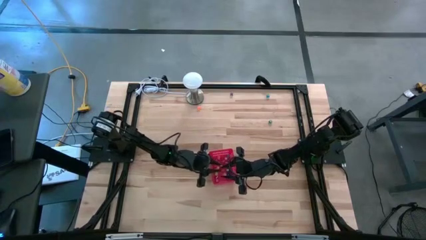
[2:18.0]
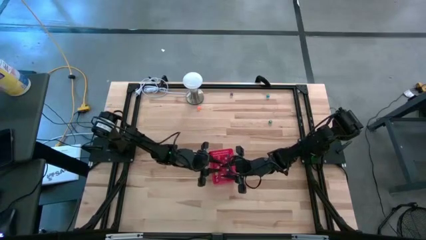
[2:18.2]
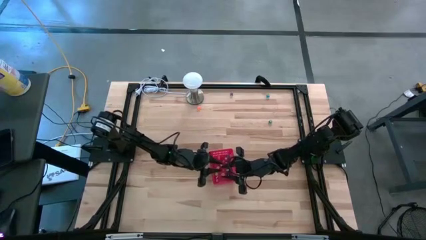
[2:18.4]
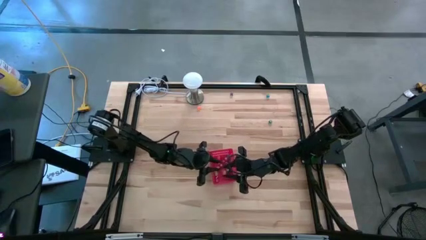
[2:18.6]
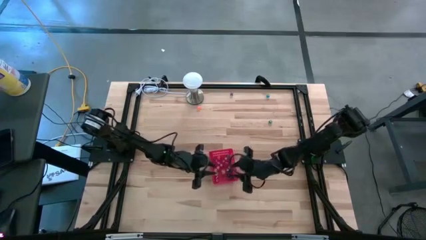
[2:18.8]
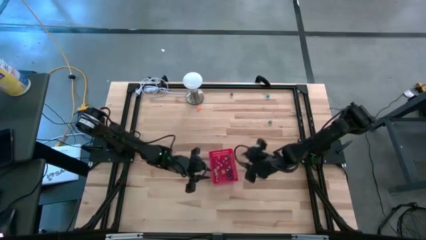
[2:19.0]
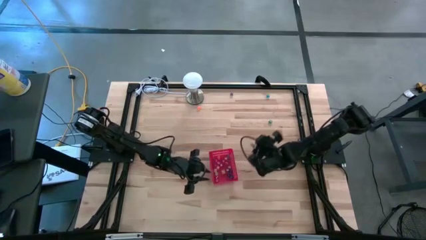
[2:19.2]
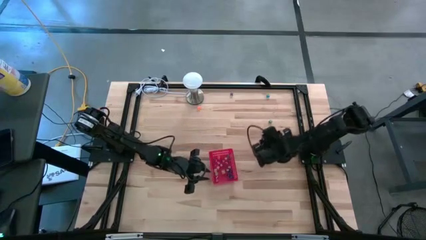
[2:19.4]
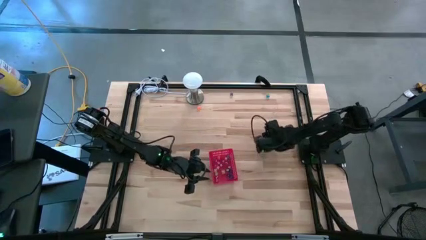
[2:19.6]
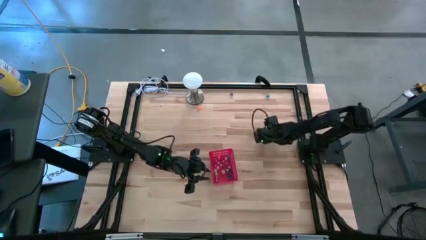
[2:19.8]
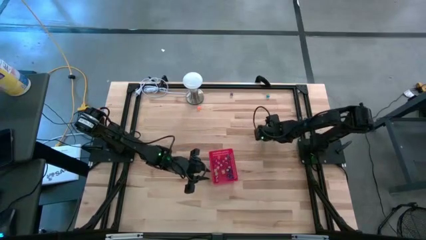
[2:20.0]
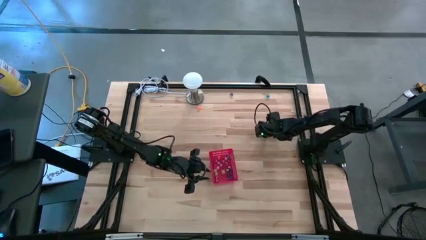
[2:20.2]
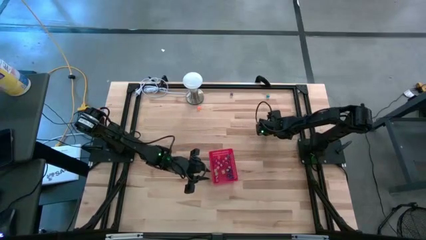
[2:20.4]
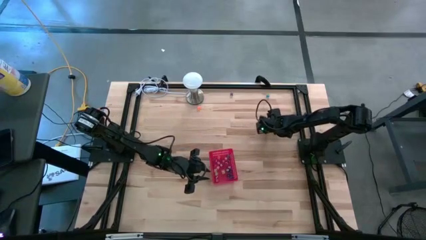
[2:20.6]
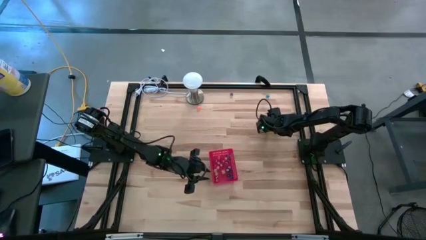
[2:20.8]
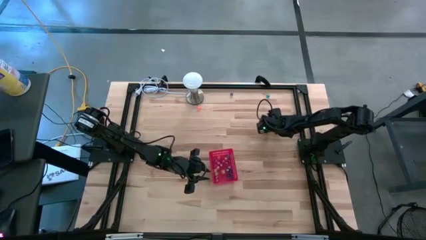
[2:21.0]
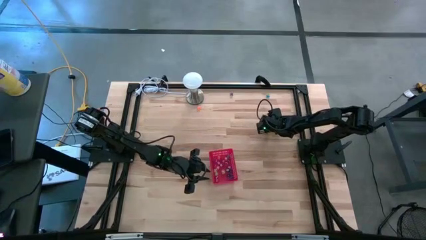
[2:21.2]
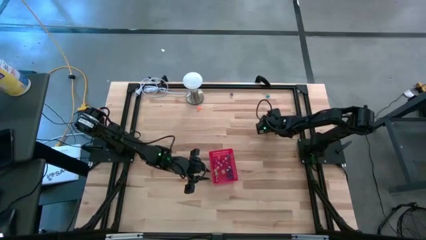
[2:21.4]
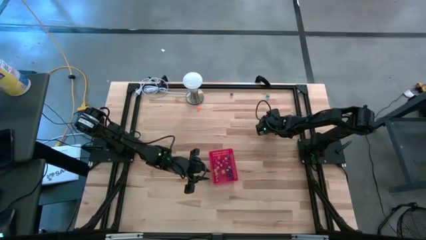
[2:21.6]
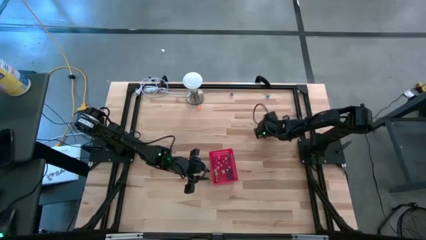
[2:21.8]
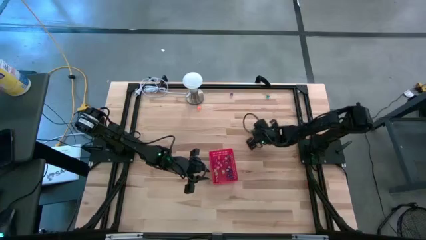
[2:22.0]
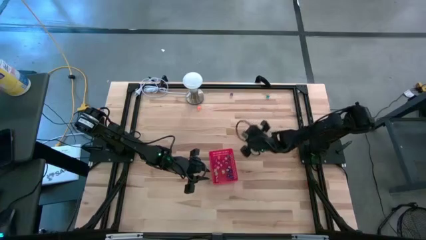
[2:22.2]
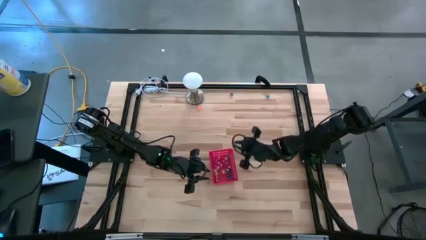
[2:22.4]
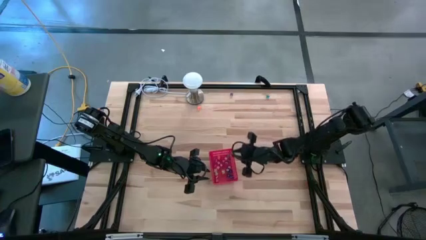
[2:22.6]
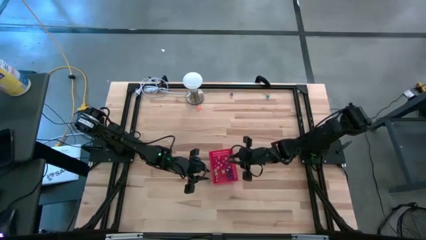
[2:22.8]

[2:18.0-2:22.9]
Task: Pick & Place Dice
Put the green die into the red basket

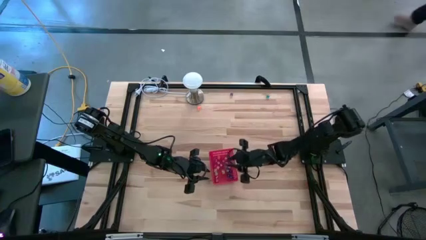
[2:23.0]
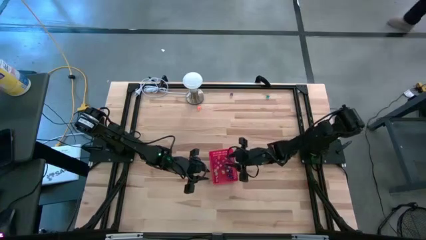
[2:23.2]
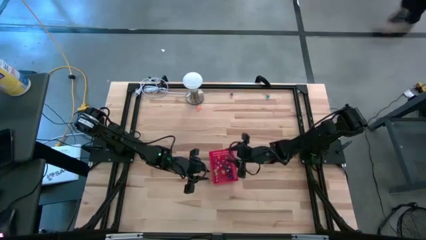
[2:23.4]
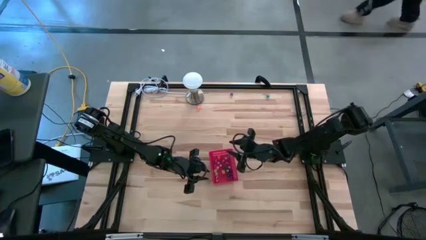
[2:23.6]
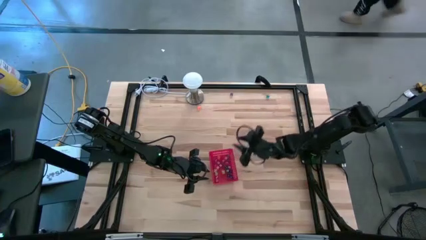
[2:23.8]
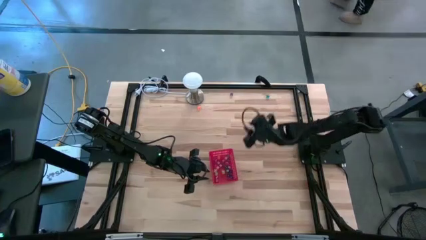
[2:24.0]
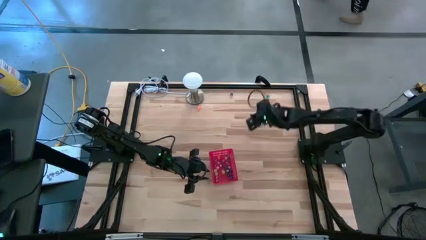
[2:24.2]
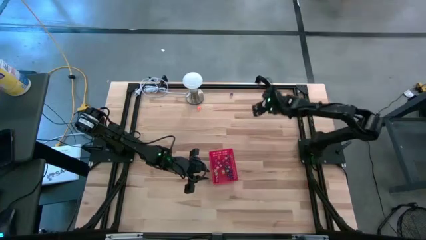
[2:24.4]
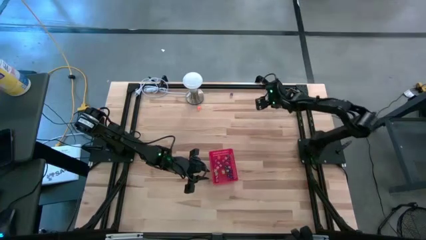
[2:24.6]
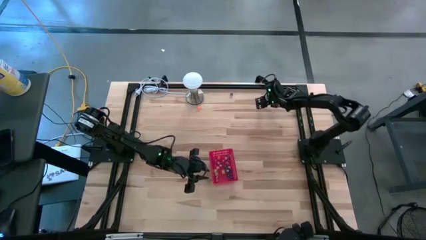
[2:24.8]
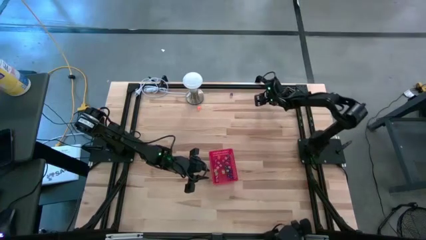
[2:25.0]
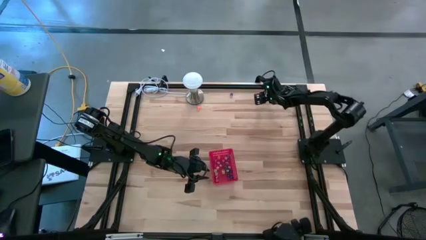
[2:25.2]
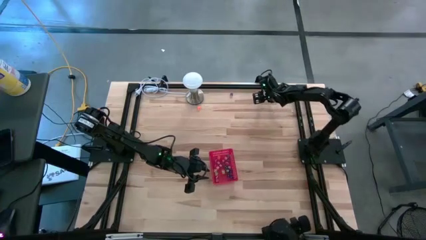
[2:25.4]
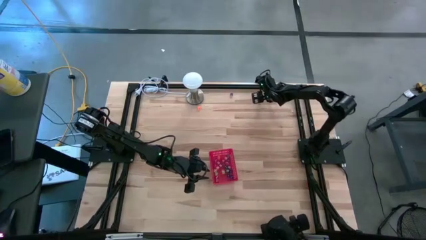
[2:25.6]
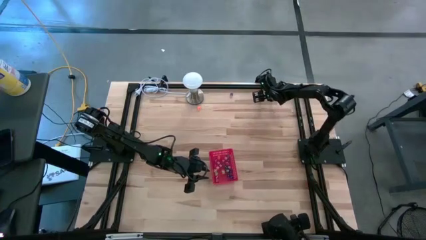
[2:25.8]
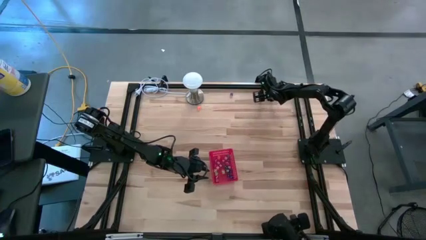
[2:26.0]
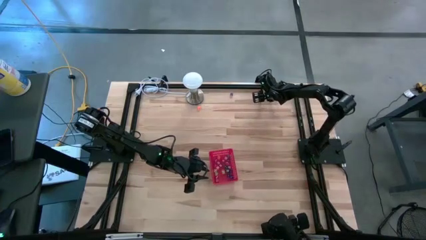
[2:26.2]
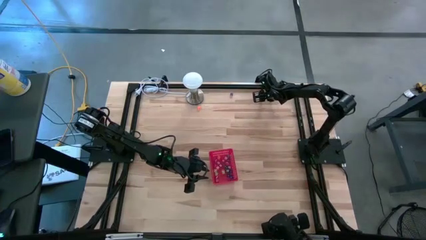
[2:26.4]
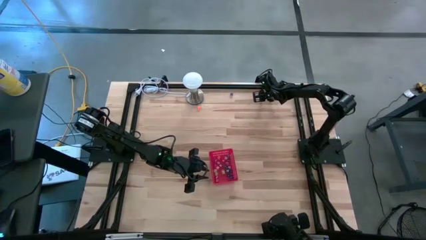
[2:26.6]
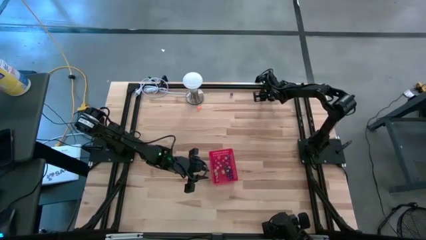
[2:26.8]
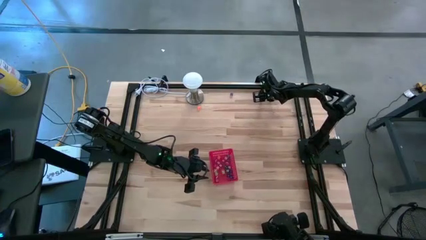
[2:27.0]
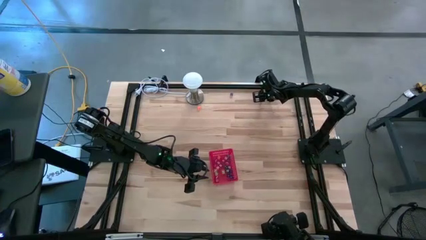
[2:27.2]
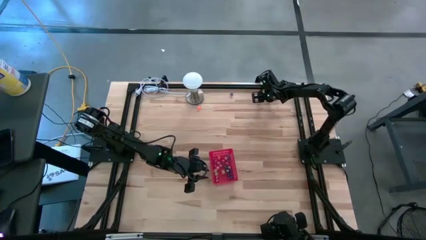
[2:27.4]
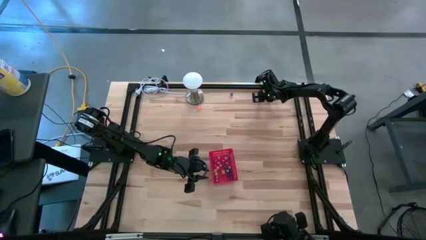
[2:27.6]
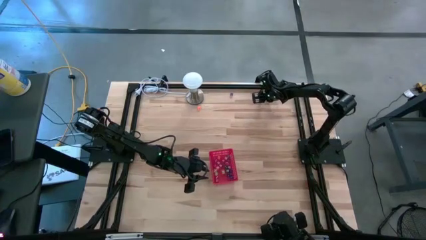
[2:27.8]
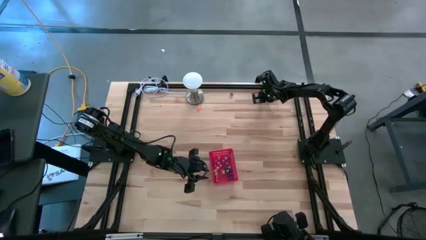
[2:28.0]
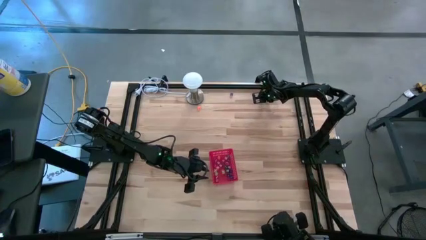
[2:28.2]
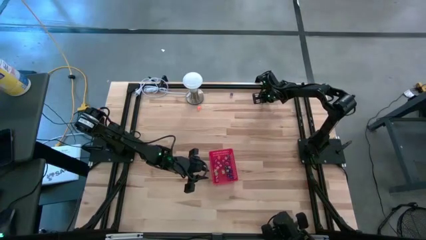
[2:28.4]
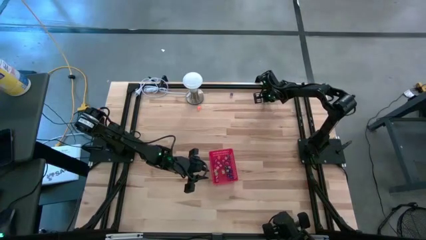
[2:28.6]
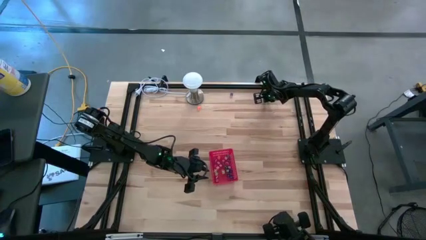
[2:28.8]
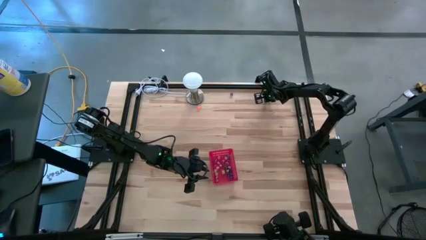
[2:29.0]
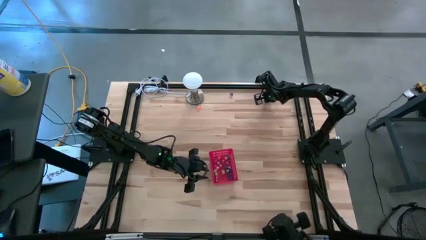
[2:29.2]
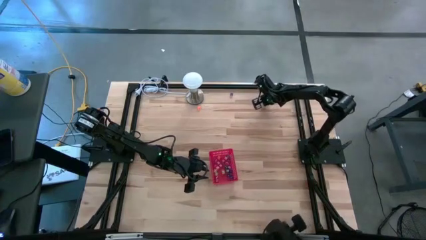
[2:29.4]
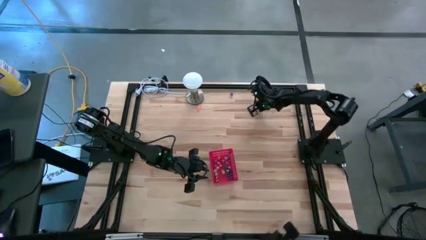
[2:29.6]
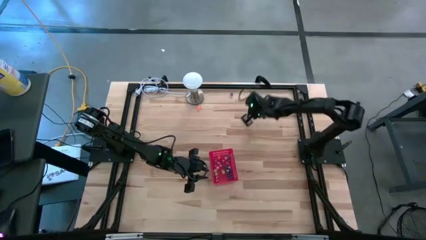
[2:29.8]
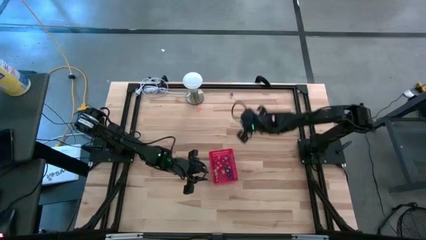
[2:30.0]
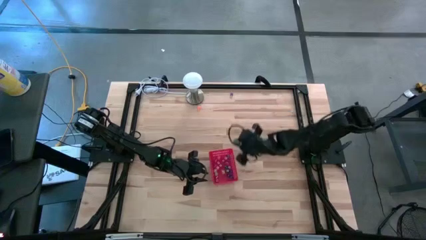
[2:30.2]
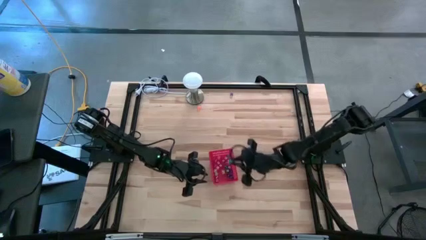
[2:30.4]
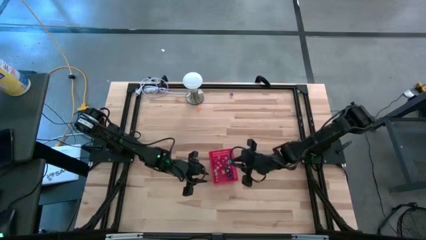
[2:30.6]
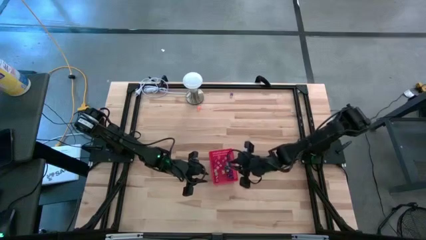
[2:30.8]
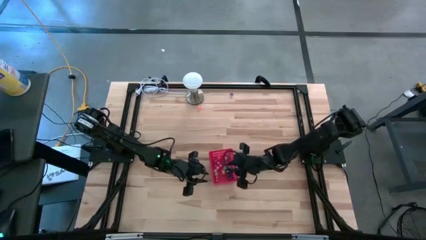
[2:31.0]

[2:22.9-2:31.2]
Put the light blue die into the red basket
